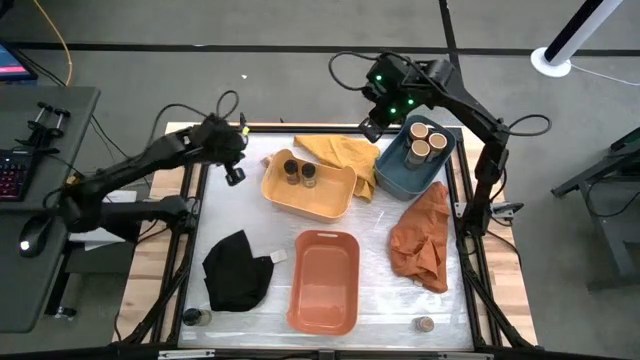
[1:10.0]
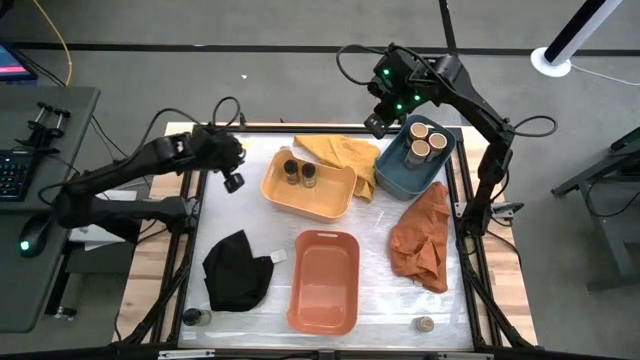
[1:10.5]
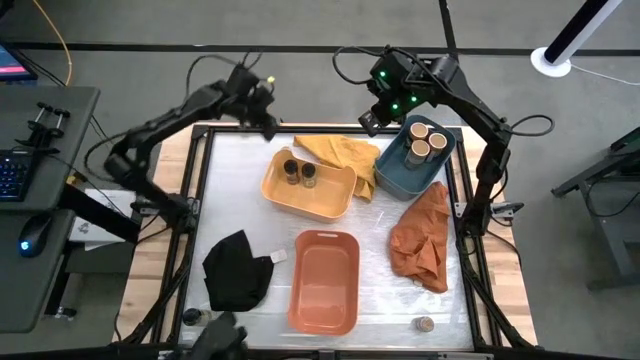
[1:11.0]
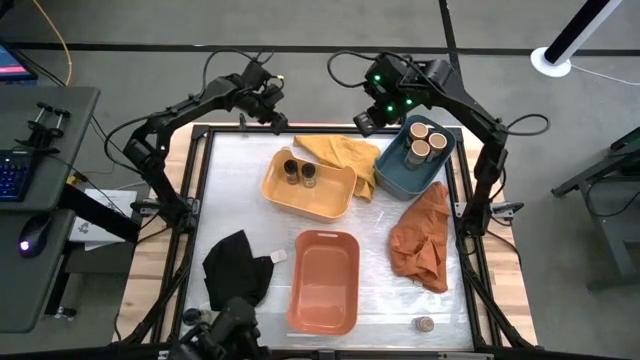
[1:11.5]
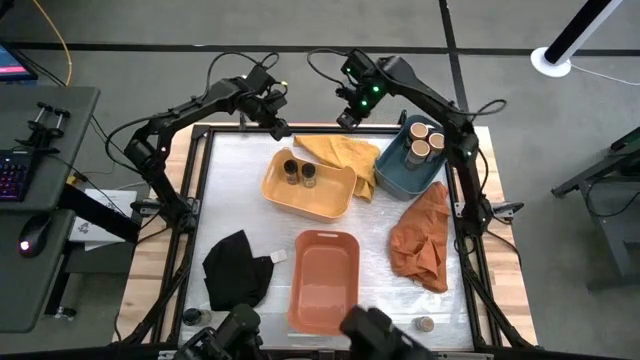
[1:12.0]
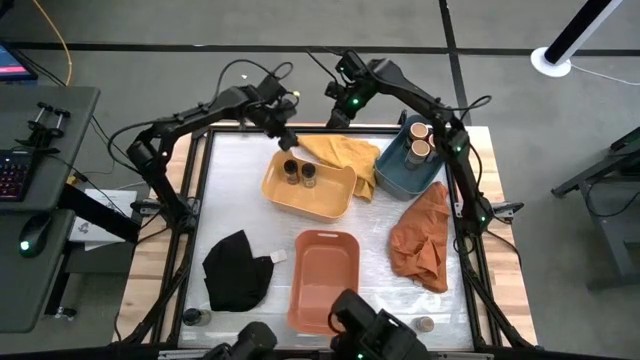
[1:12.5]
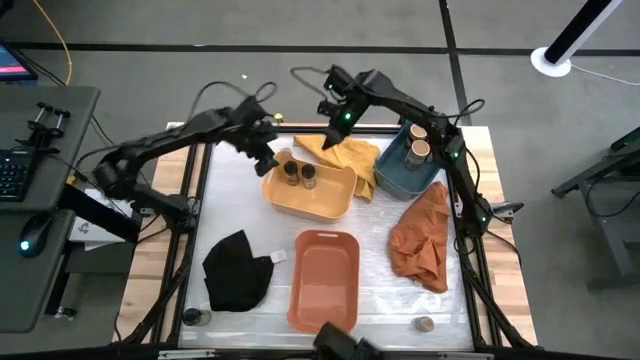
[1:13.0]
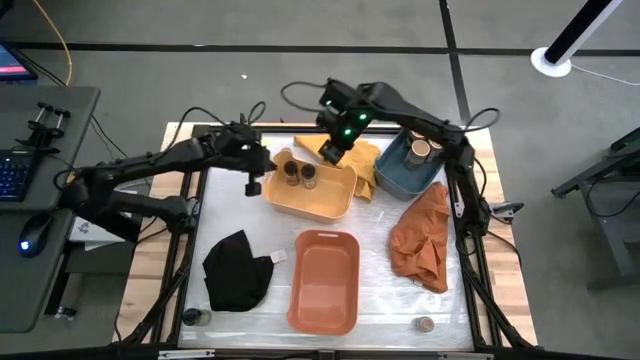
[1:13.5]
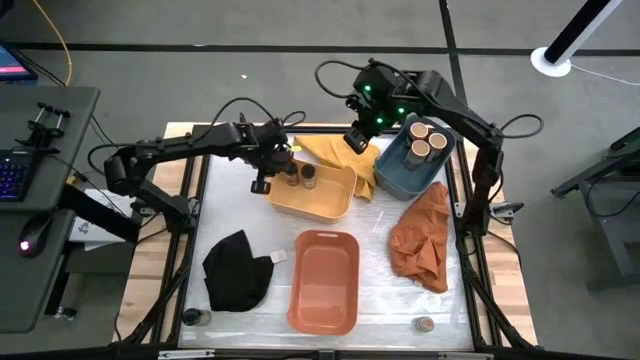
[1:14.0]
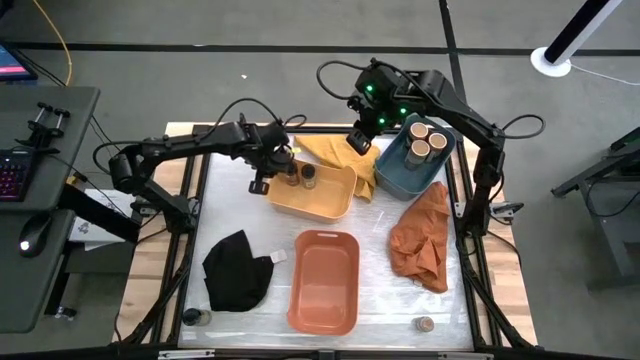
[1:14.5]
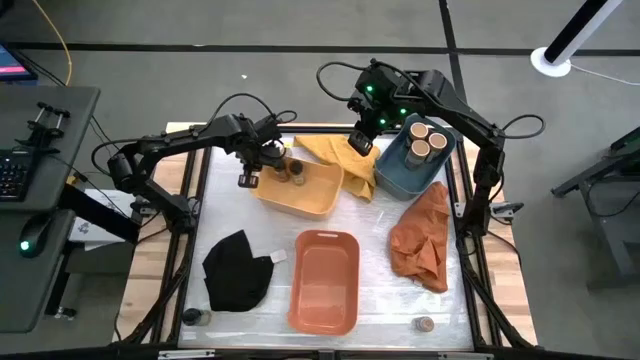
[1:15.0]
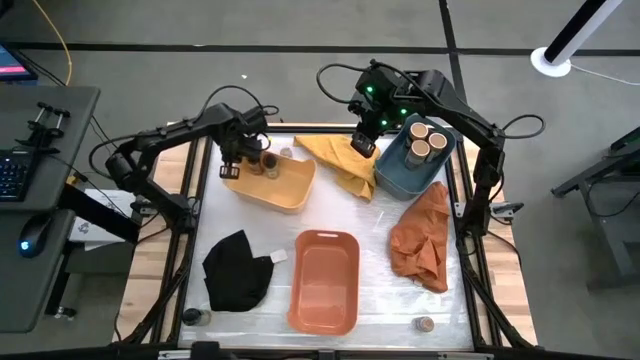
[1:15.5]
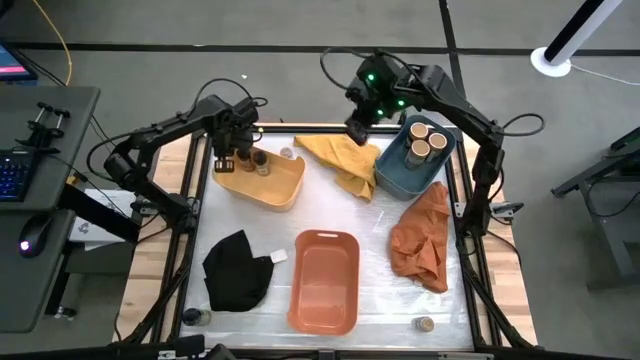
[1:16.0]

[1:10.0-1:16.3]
Task: Sort spices by type
Adjust the yellow bin

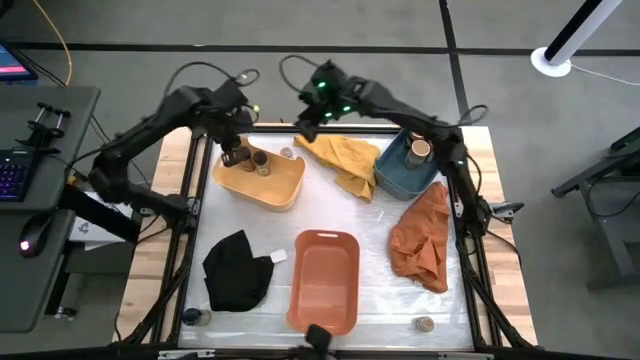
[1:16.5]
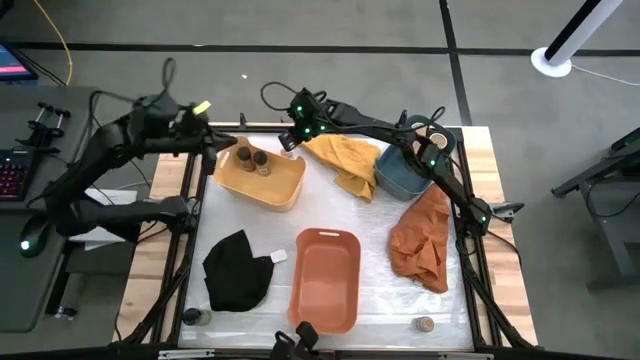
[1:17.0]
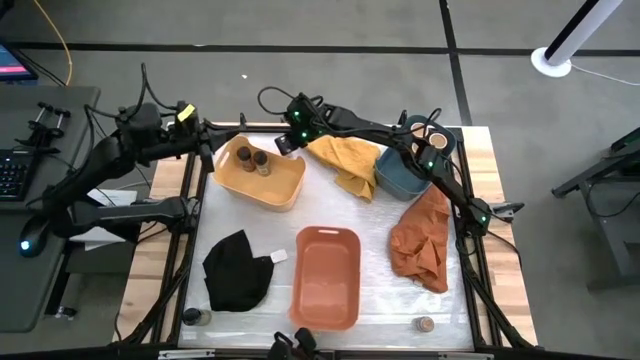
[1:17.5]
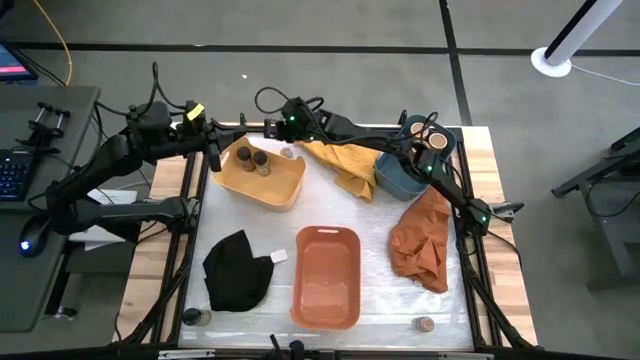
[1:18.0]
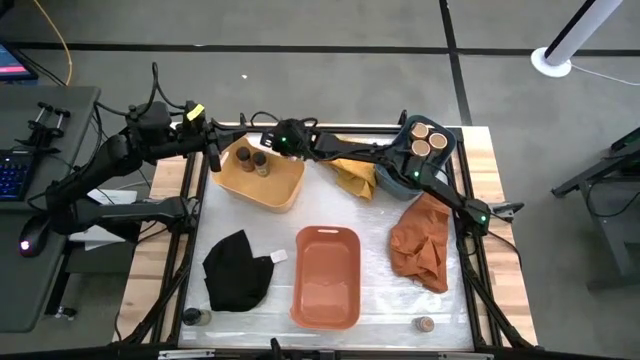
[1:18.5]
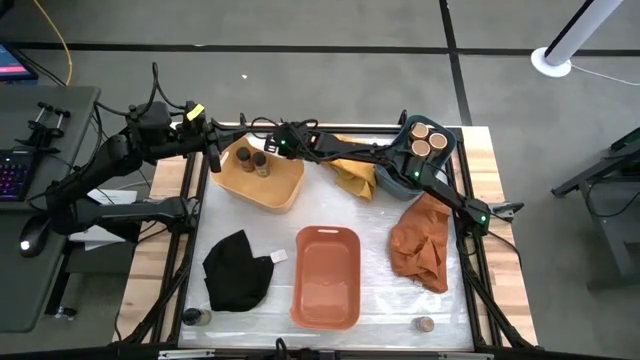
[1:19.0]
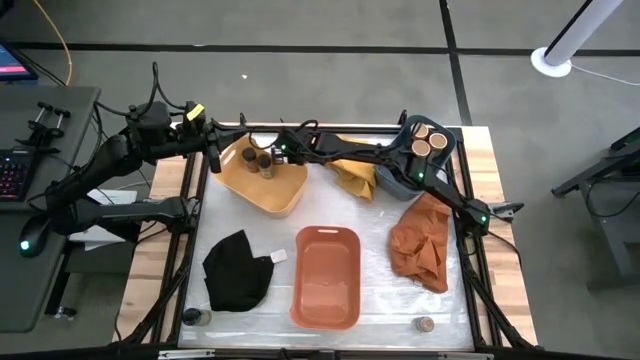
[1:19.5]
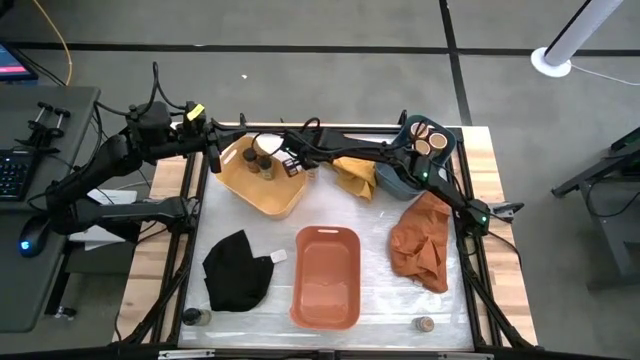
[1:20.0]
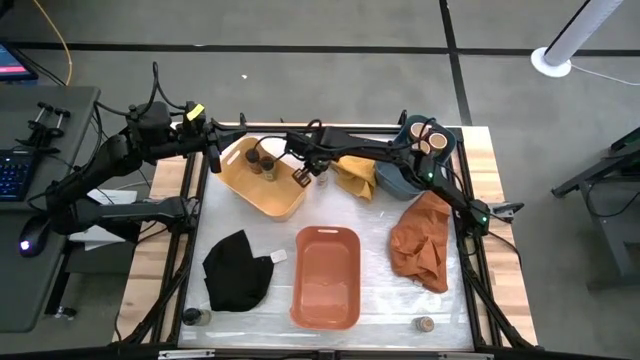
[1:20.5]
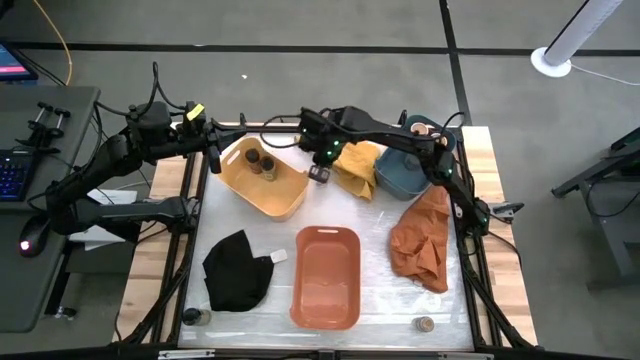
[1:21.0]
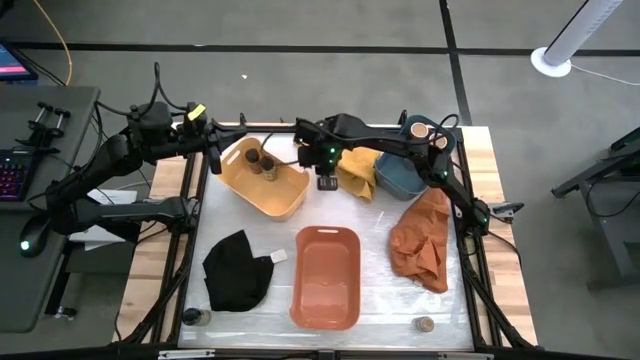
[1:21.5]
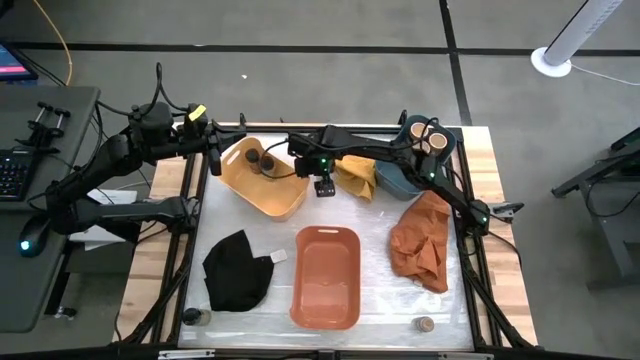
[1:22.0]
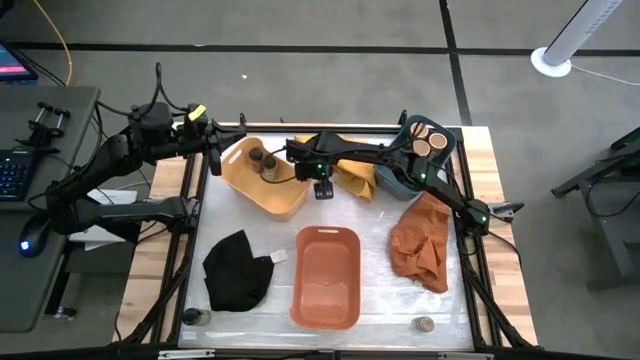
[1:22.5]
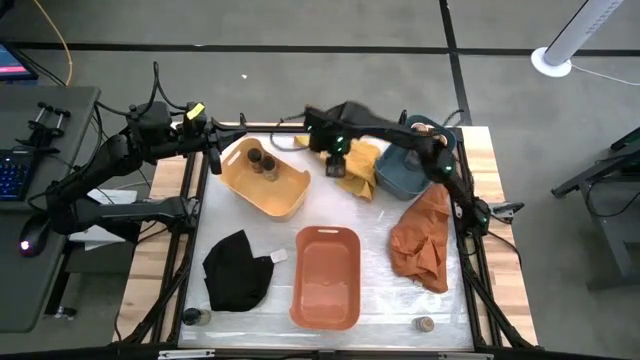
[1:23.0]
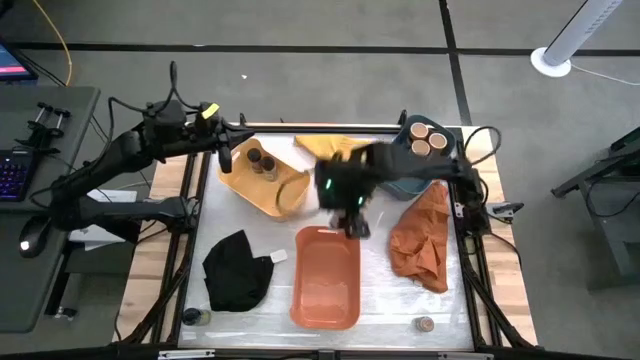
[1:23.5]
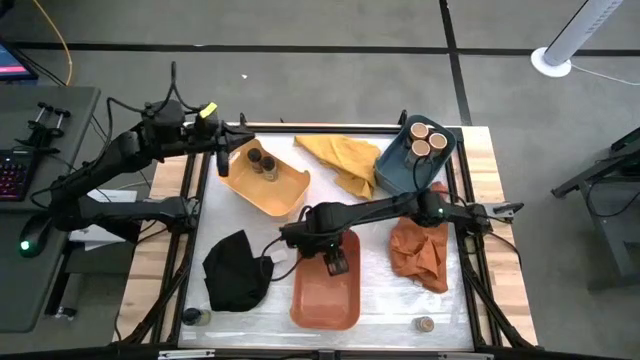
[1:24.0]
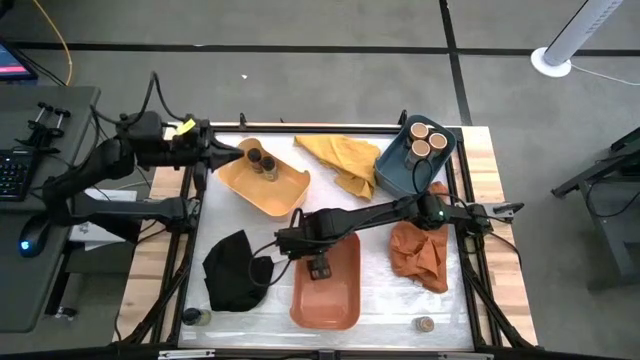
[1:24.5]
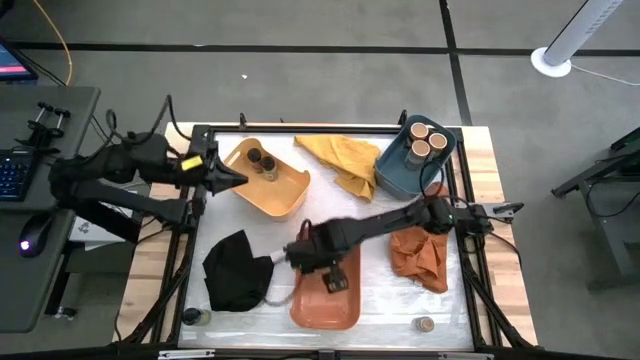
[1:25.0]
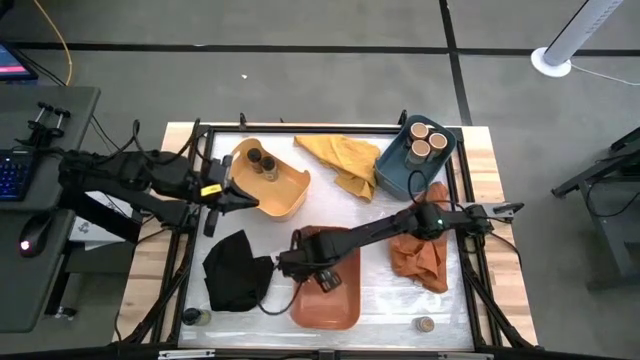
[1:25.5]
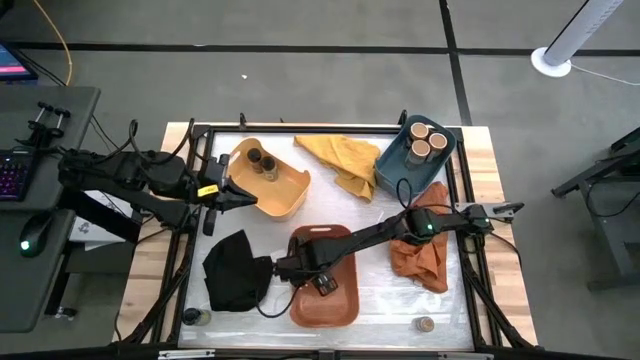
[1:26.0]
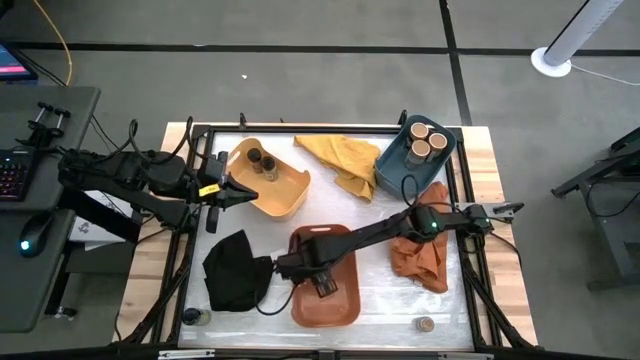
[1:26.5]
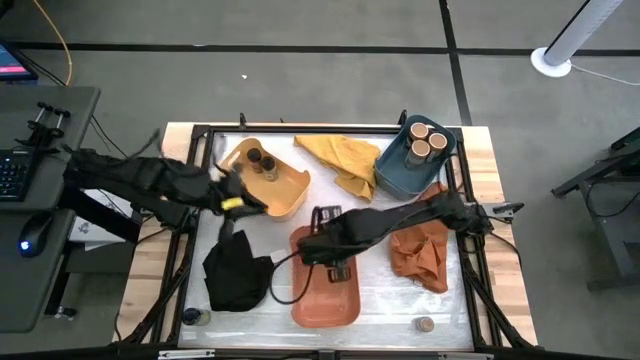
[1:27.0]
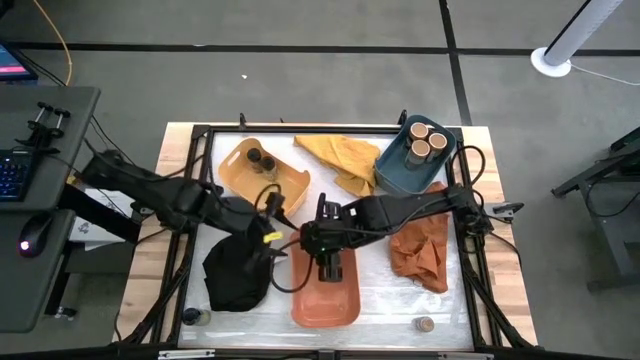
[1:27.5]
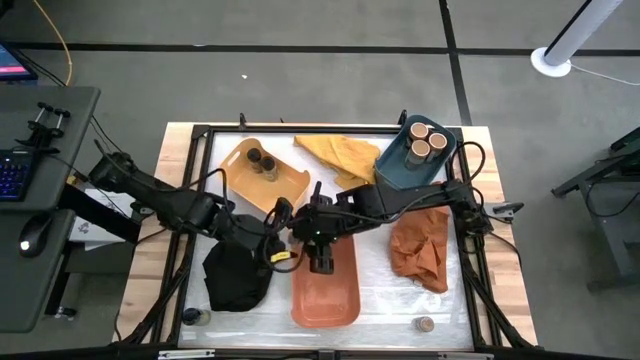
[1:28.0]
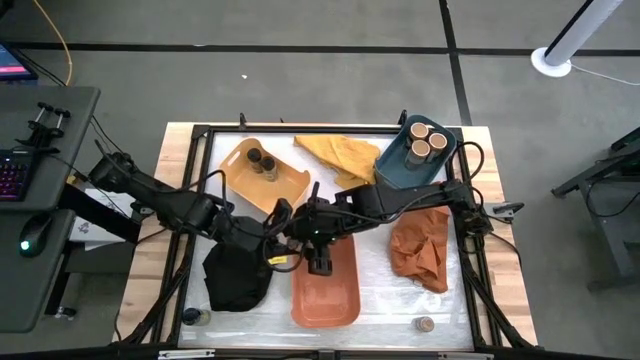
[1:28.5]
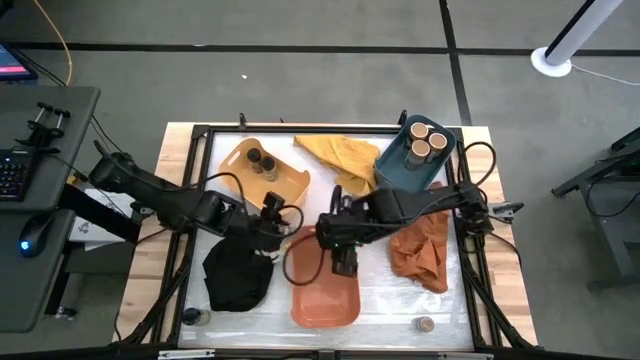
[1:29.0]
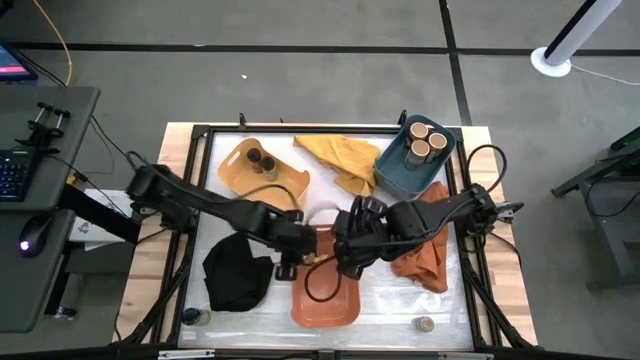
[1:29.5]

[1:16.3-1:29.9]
Put the top brown seasoning bottle into the orange bin
